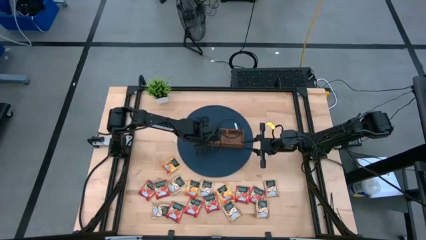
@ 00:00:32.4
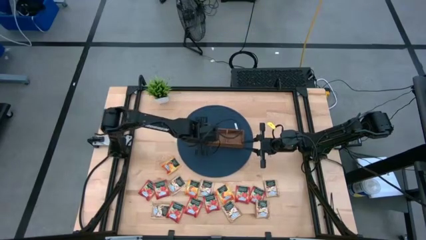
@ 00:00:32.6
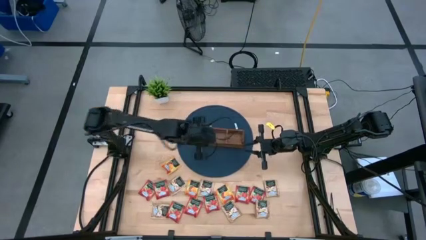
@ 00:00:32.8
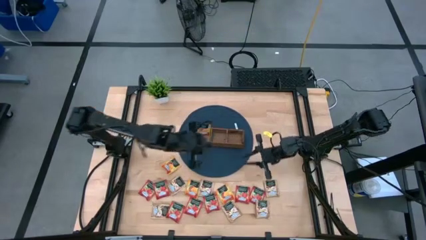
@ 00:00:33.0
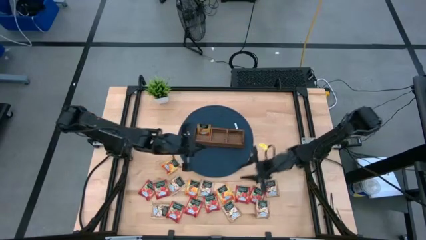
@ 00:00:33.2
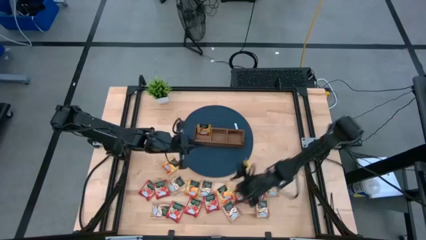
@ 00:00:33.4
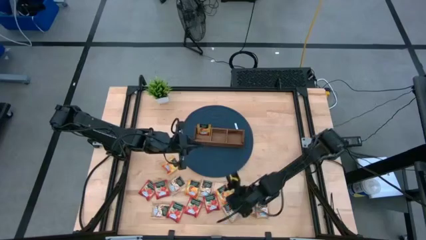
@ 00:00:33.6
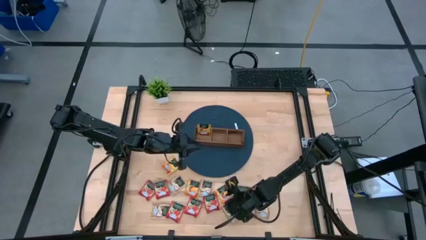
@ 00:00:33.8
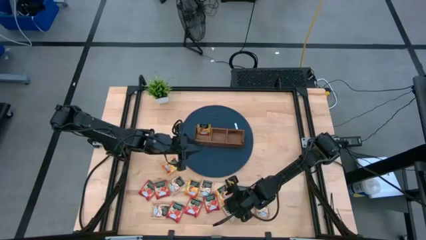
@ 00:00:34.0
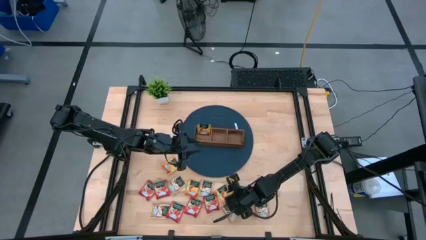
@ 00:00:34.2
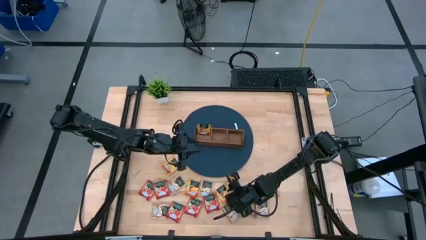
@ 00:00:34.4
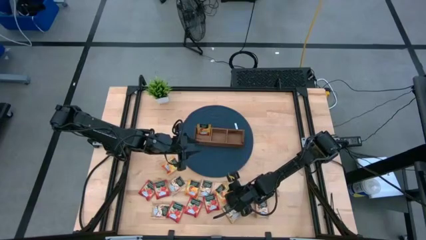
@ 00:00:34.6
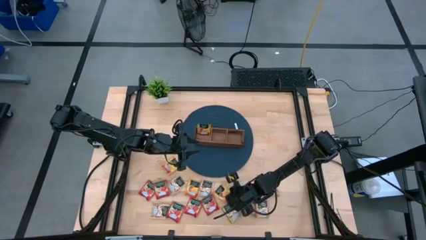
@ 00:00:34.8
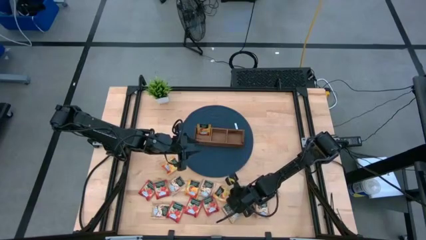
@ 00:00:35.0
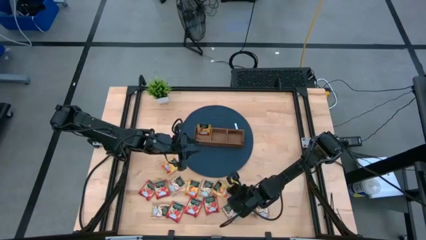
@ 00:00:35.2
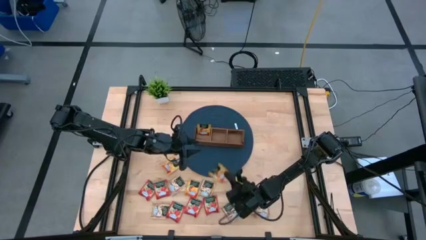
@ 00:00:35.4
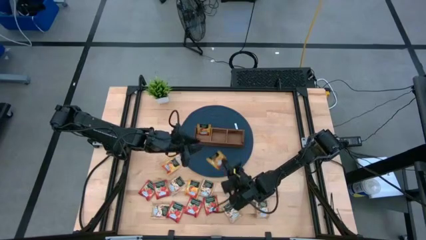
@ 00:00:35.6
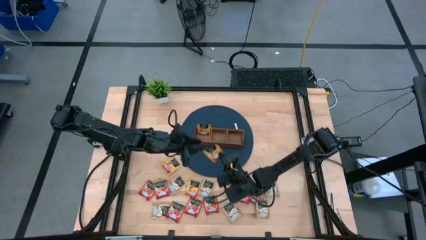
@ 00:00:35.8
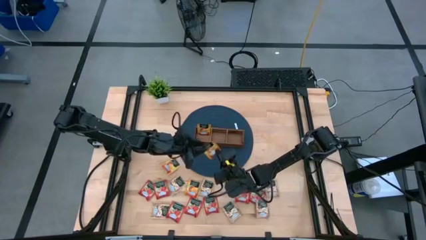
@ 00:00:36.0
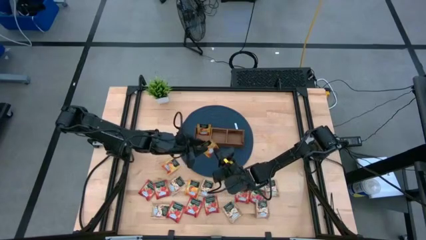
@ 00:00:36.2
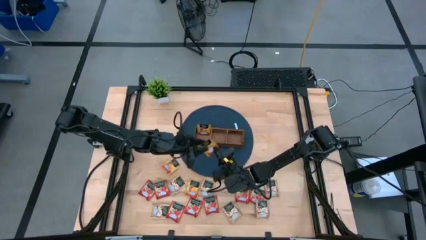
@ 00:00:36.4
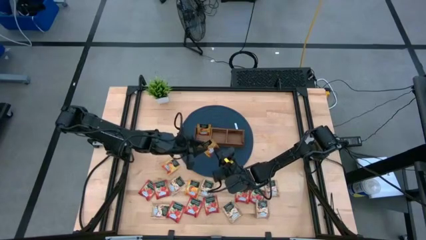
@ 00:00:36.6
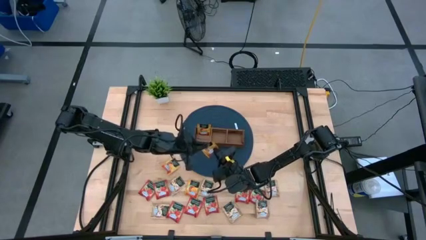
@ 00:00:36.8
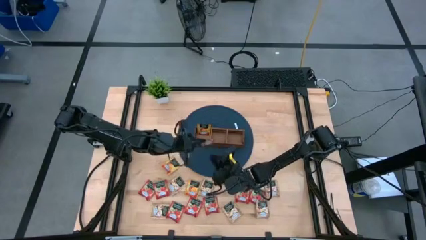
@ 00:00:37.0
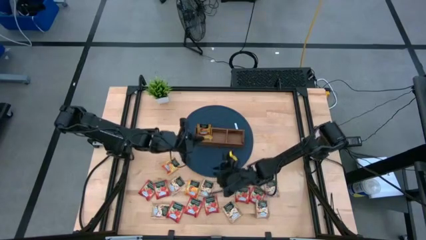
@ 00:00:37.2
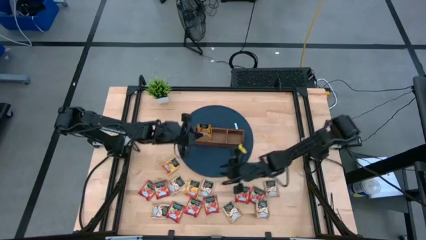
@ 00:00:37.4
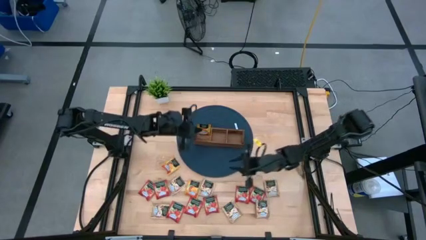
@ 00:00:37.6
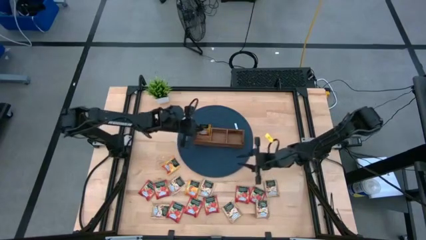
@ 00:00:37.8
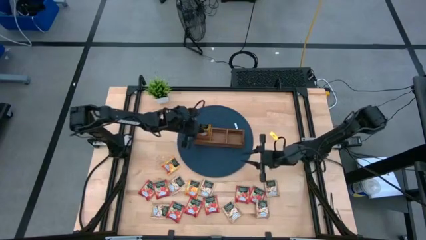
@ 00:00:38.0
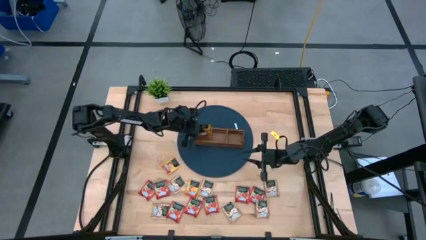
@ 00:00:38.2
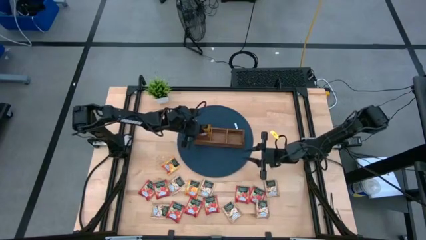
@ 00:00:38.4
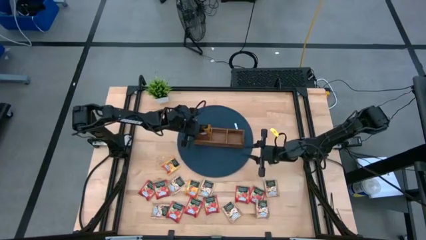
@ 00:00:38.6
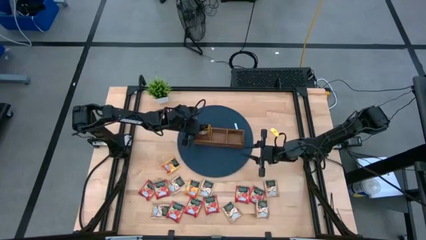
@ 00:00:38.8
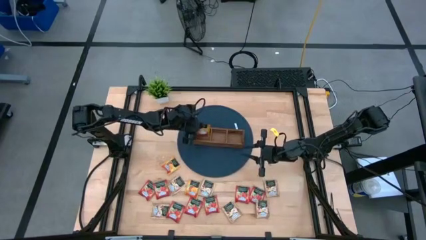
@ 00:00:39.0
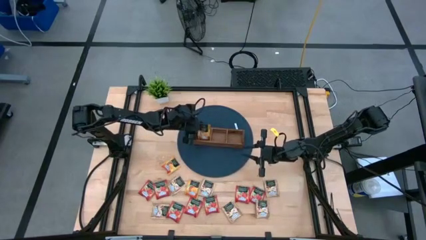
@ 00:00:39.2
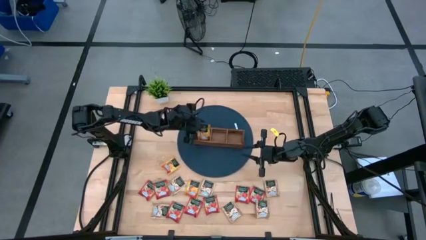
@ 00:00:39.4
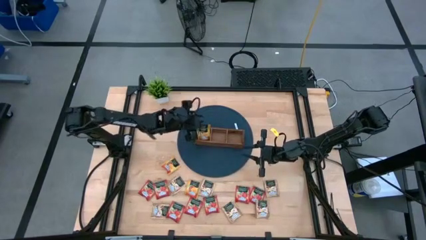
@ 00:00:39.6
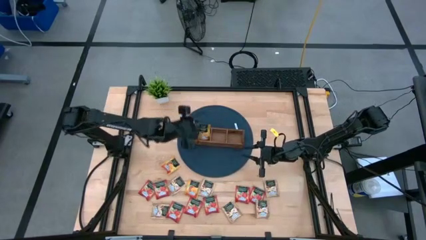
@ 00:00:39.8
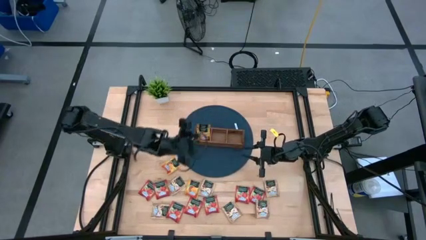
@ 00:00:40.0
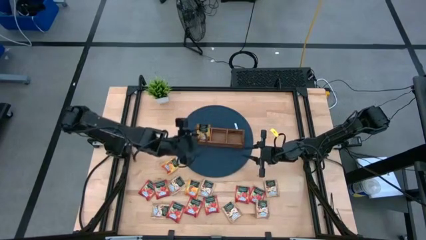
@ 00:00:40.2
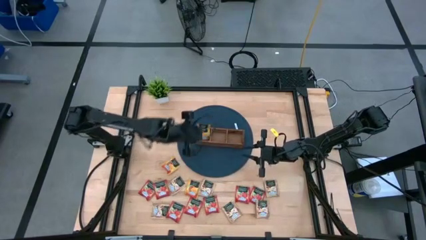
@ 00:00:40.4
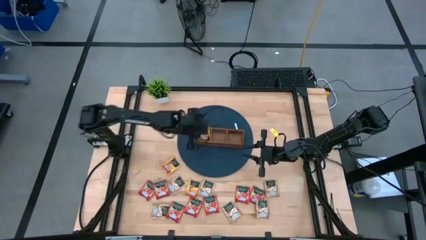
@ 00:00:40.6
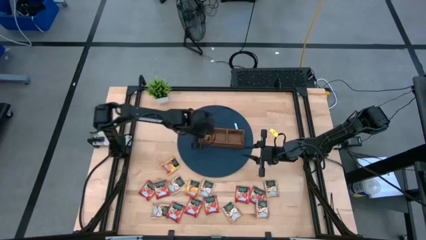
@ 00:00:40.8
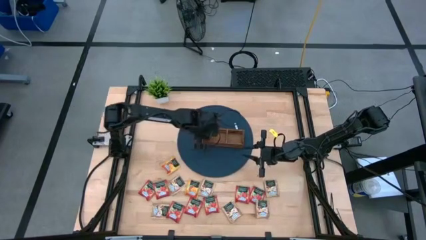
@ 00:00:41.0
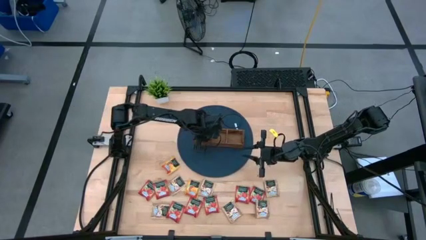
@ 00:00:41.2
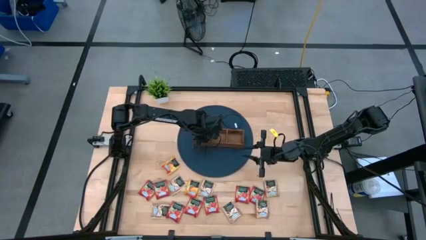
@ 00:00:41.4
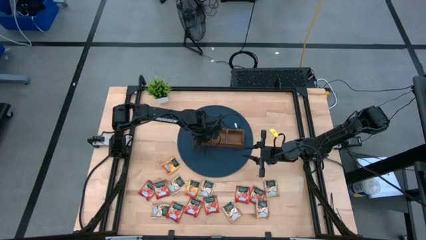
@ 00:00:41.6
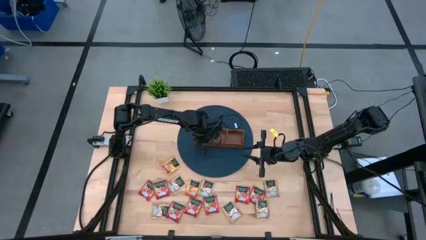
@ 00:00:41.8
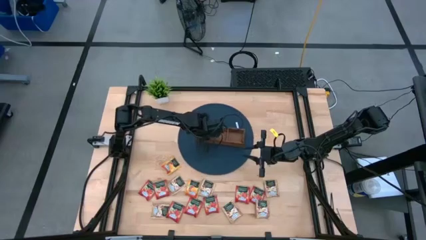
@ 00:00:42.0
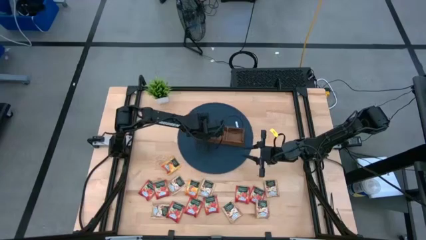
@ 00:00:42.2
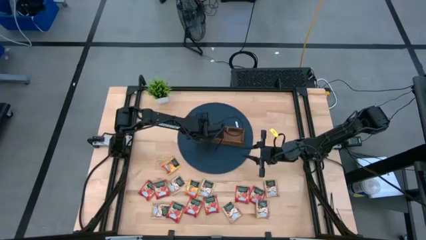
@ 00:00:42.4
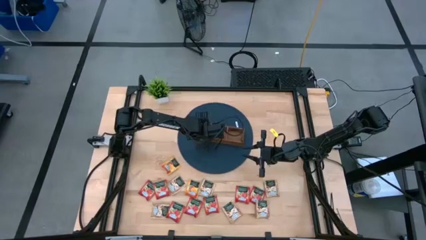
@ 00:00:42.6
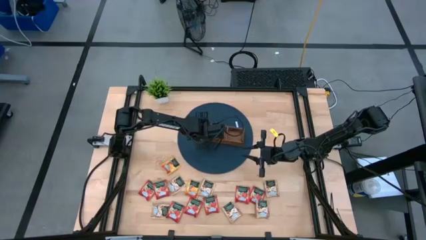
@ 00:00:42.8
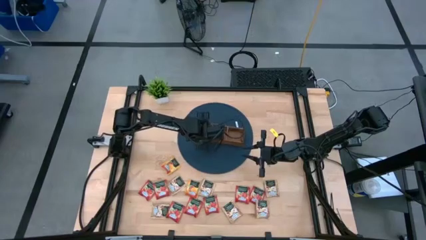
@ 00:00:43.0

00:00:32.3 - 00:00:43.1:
Task: Pick & Place Tea
Put the yellow tea bag into the left section of the wooden organizer
